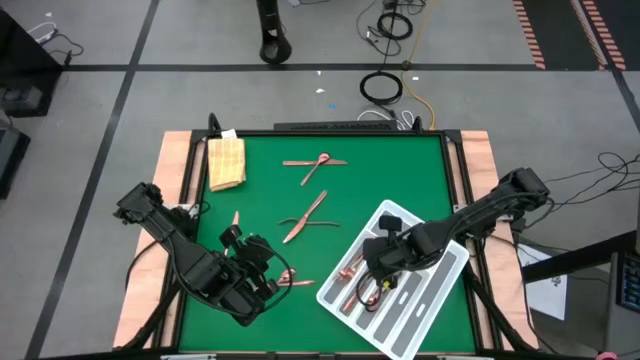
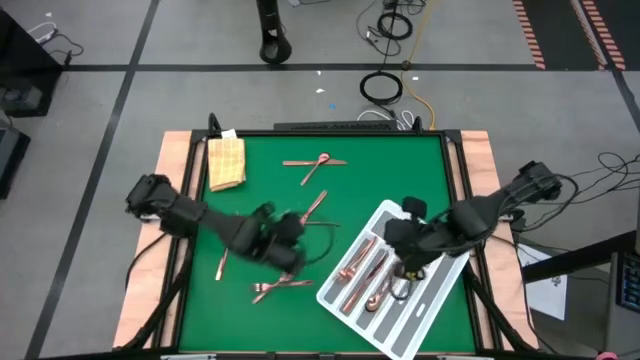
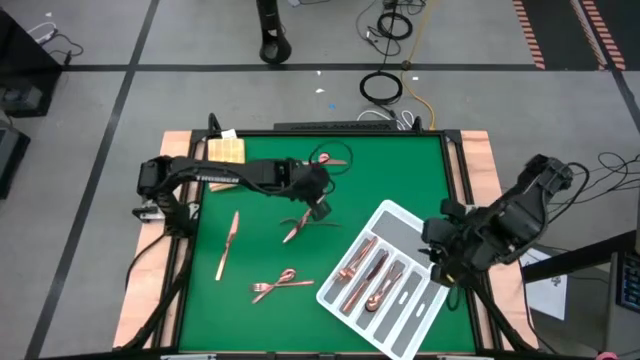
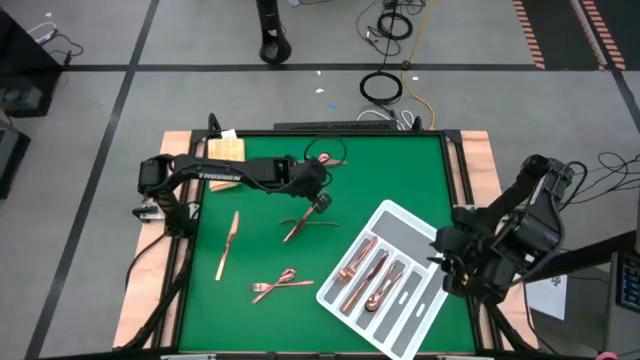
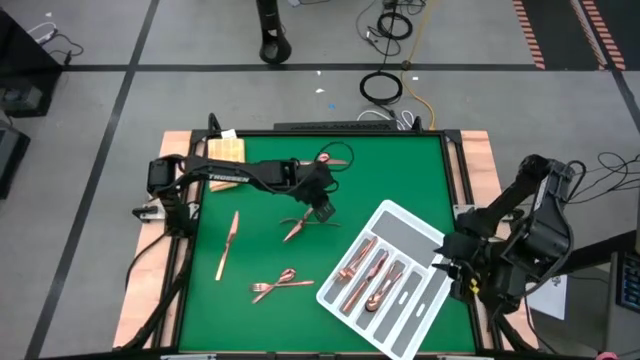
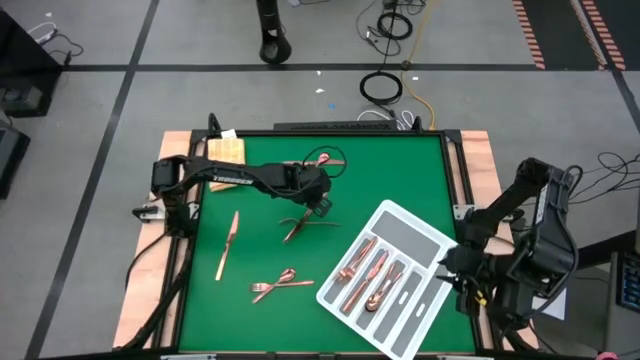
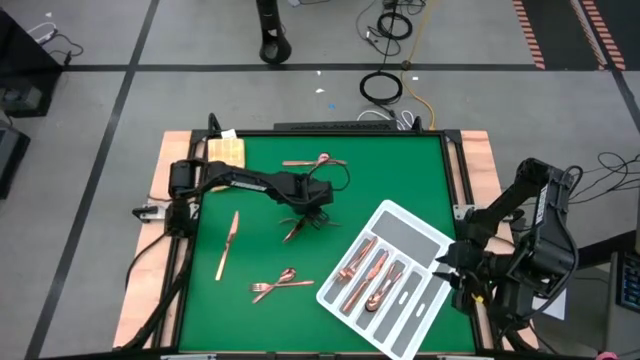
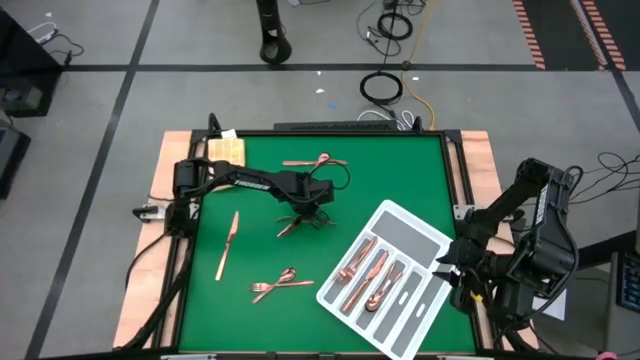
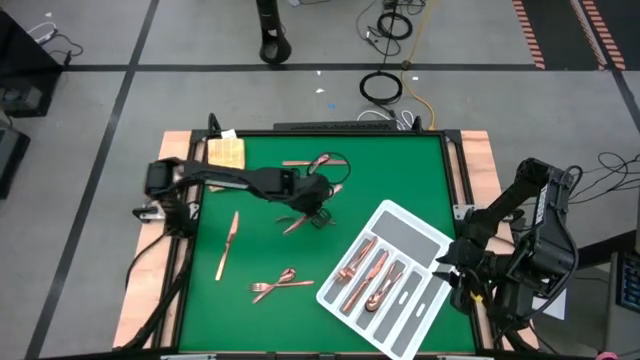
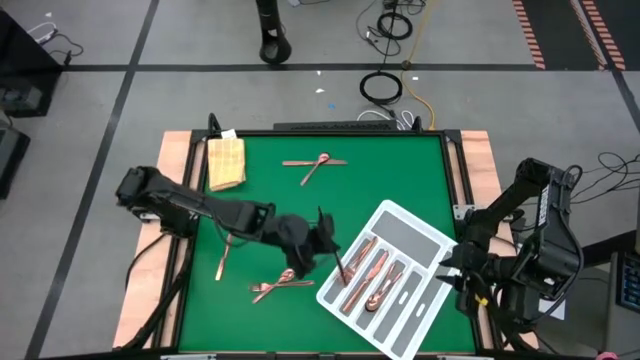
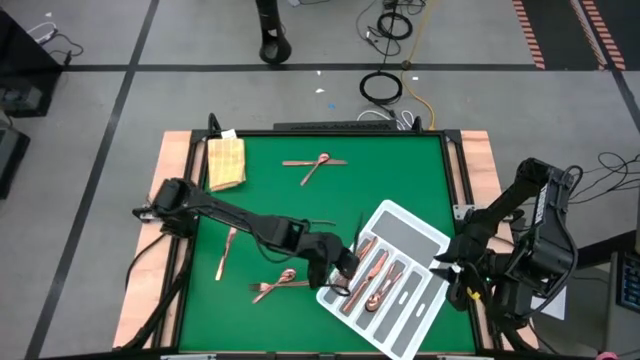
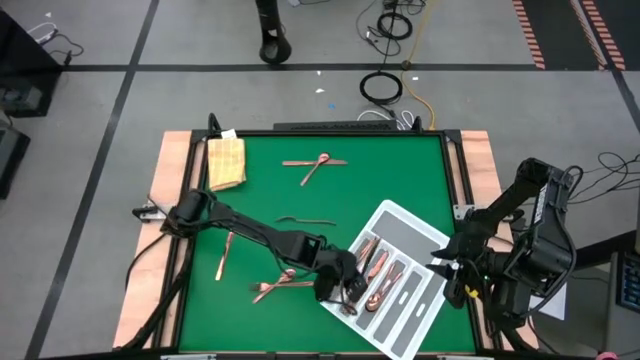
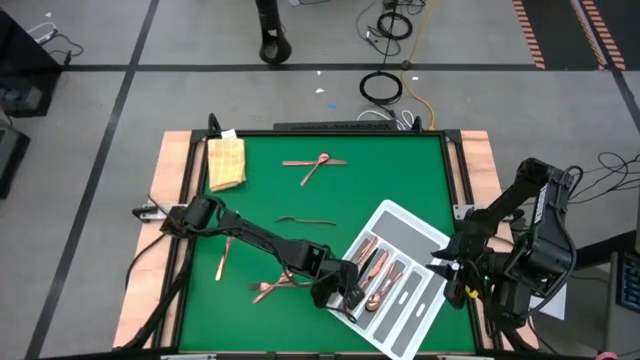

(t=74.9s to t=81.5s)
Task: Sort silverware
Put the bronze knife into the silverware tray

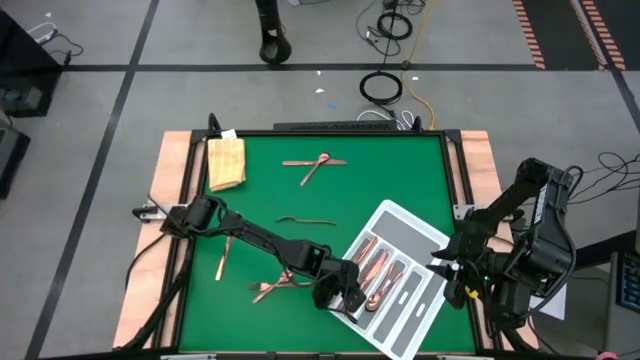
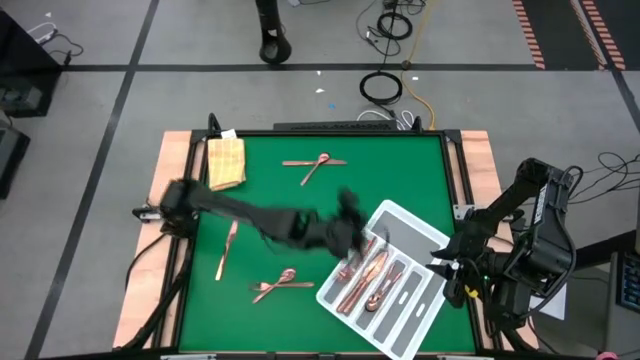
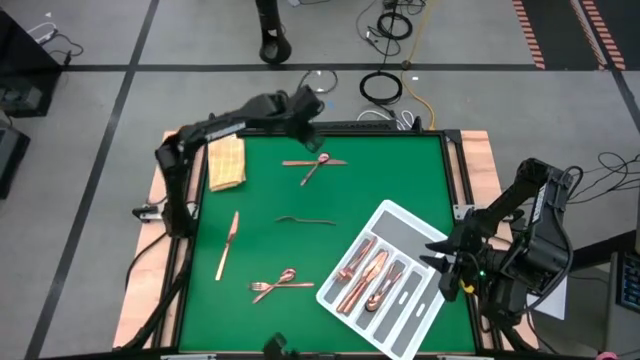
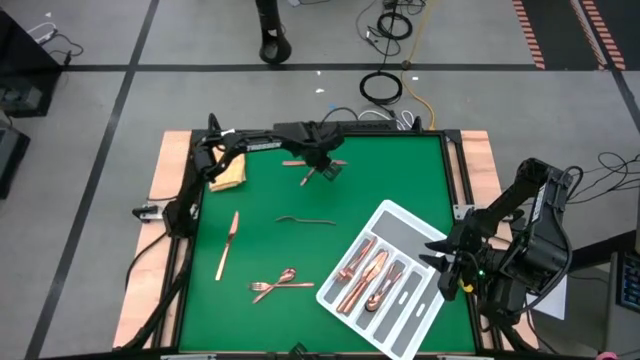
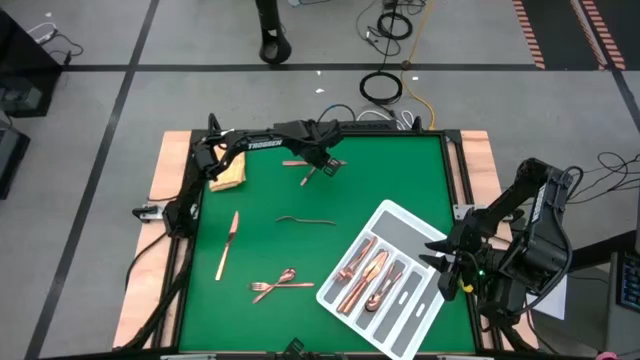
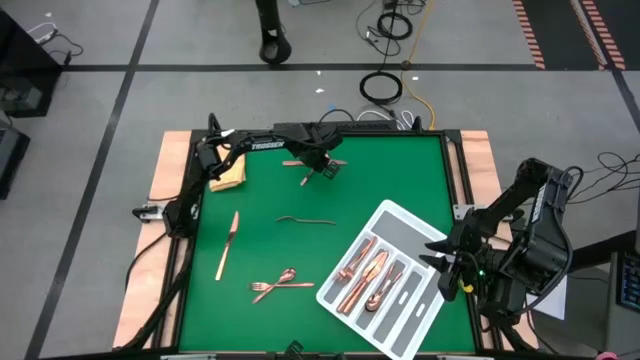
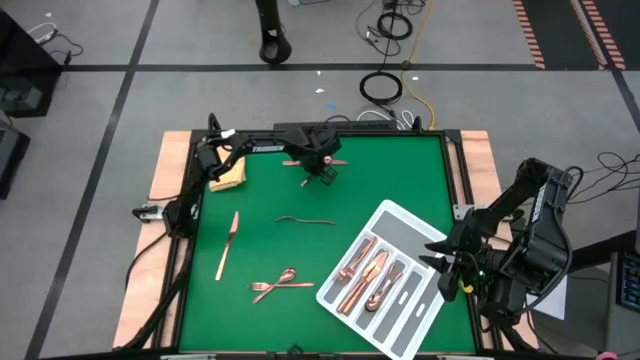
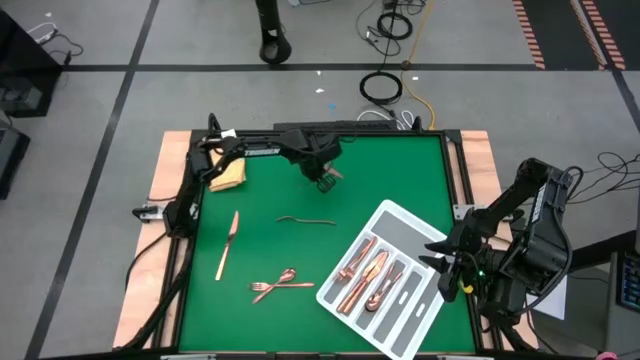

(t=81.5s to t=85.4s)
Put the bronze spoon into the silverware tray

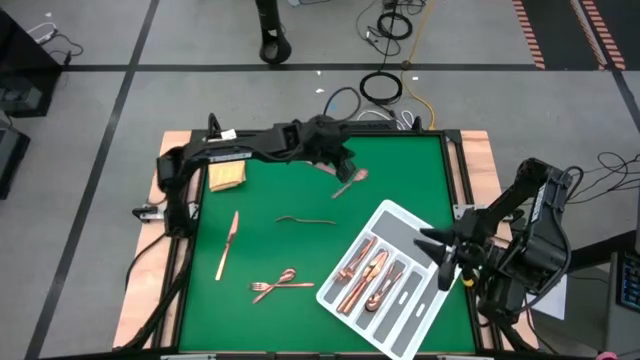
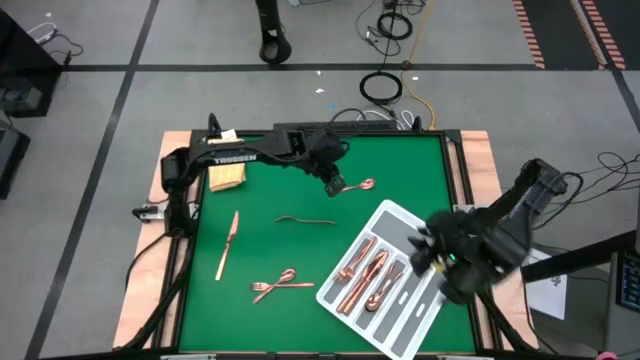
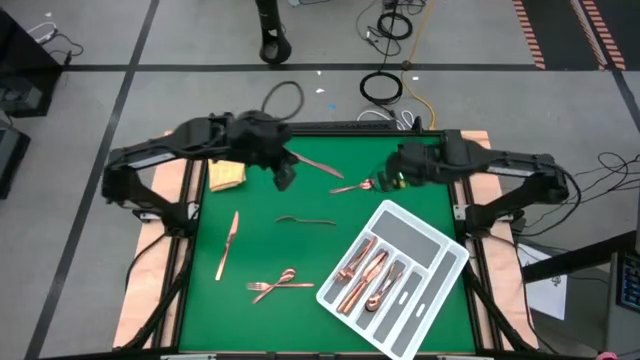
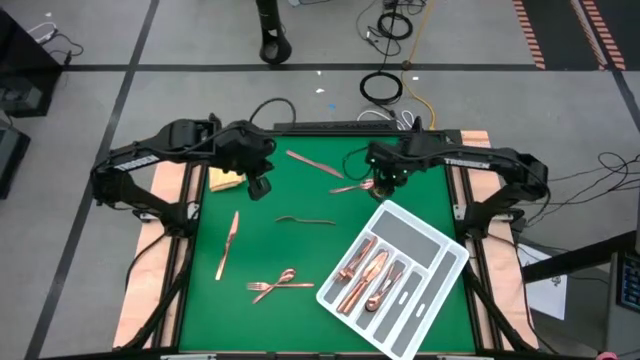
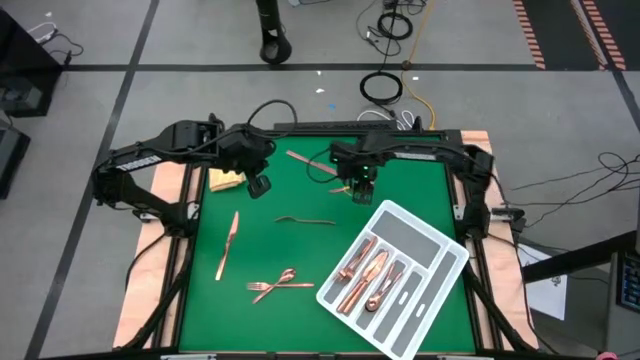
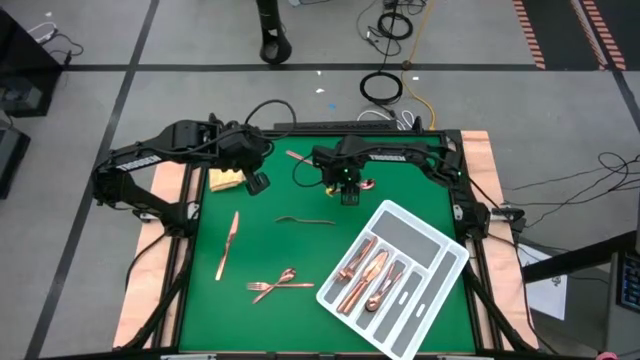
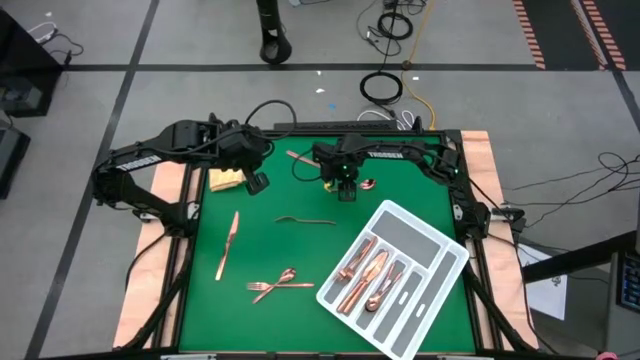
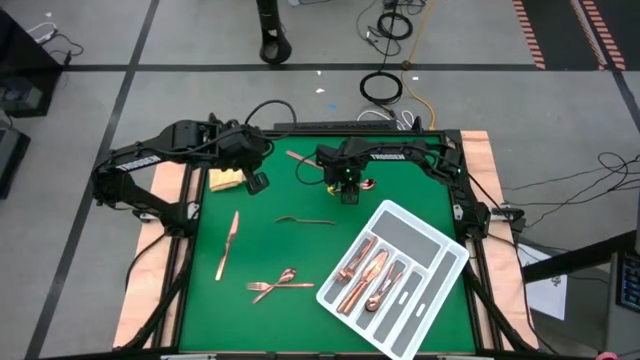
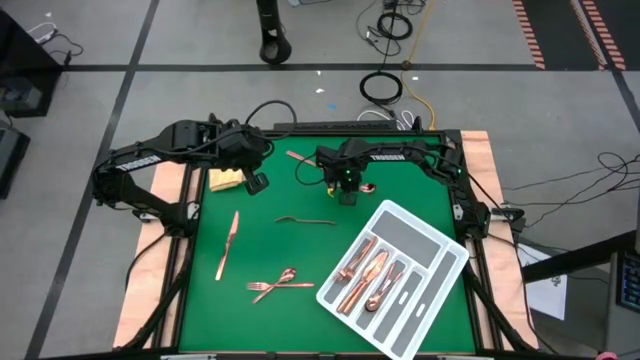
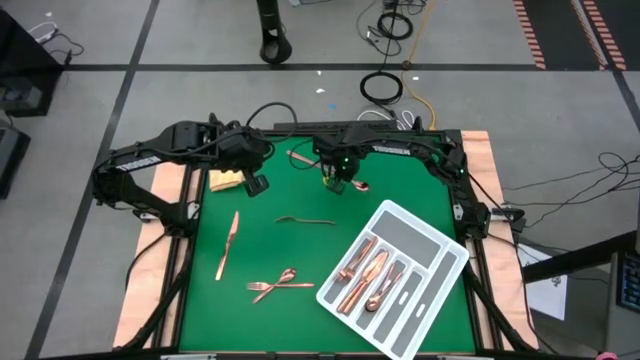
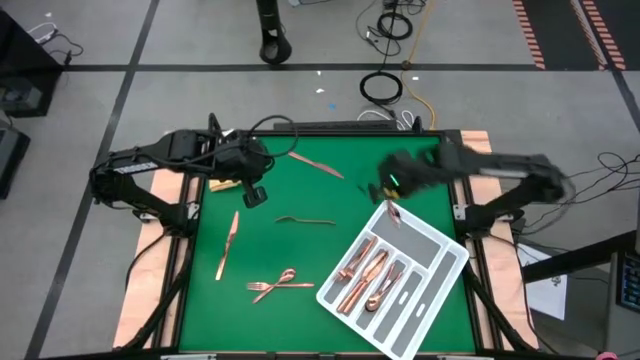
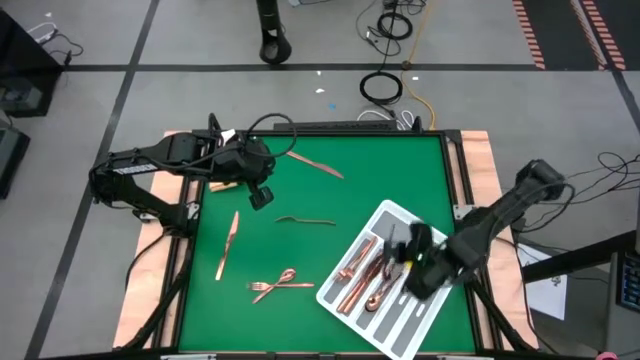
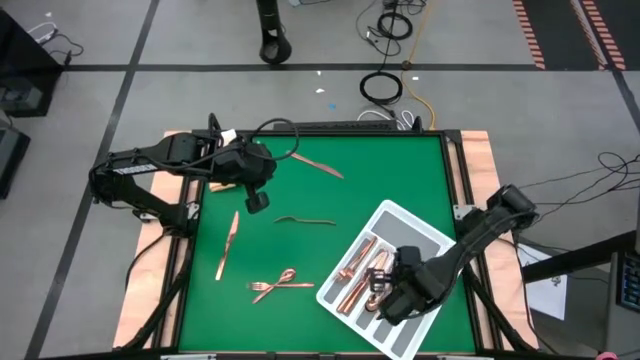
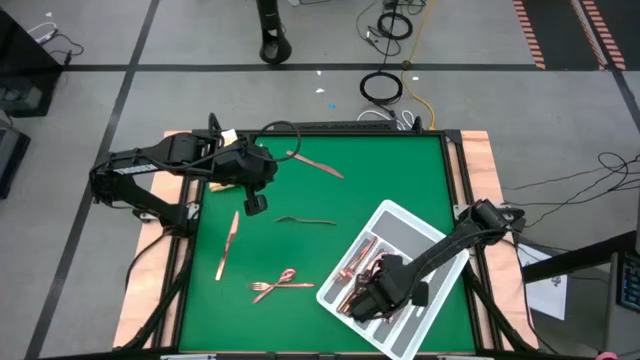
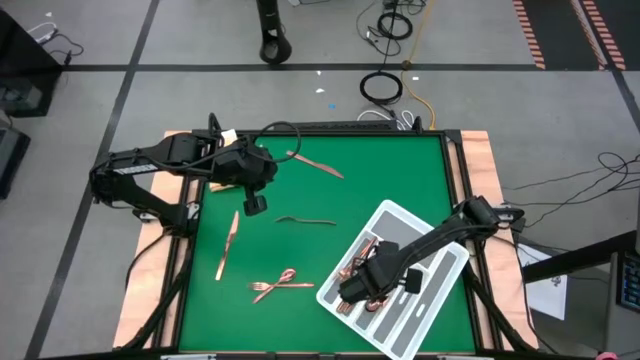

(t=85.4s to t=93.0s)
Put the bronze spoon into the silverware tray

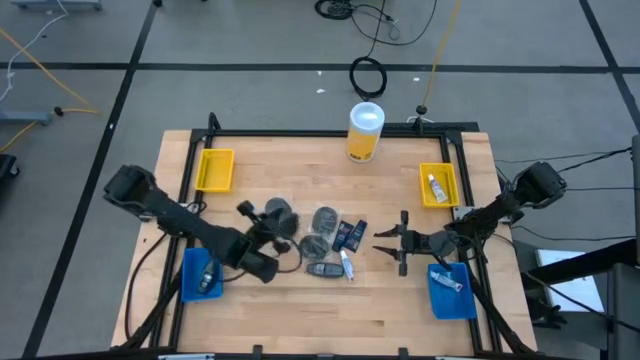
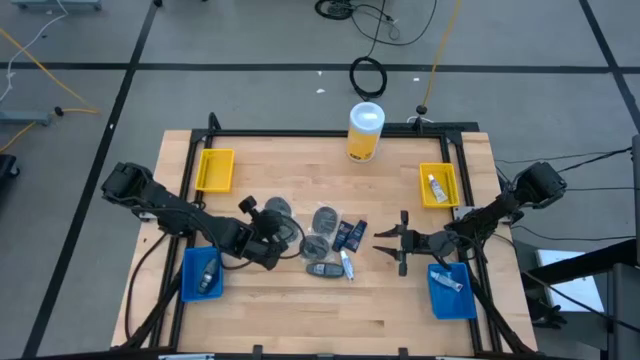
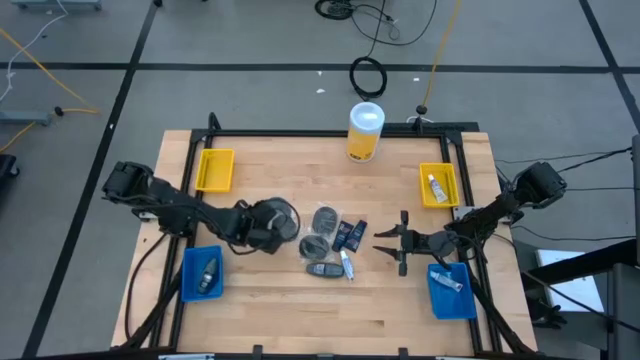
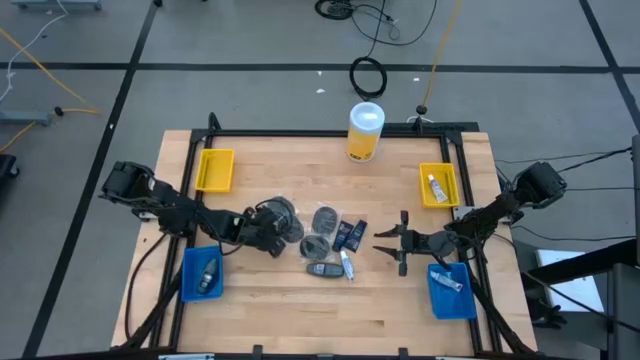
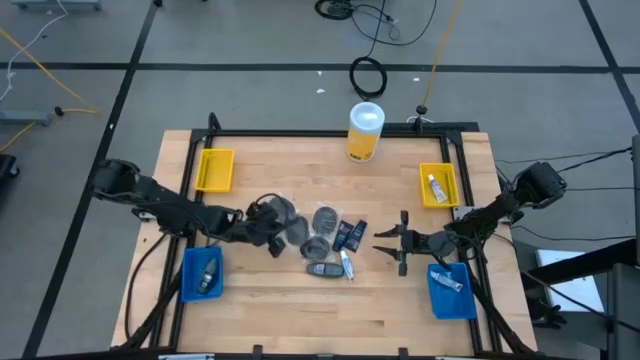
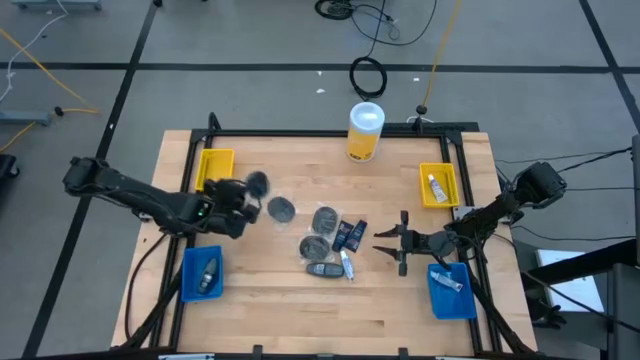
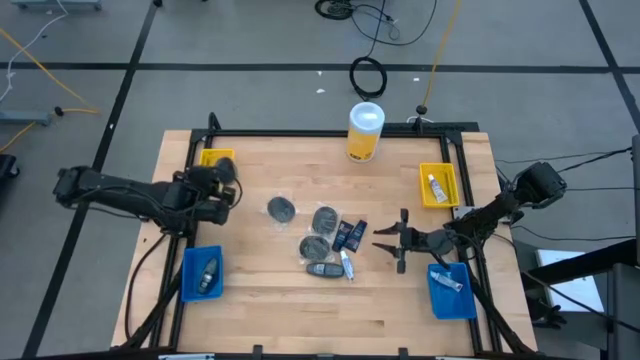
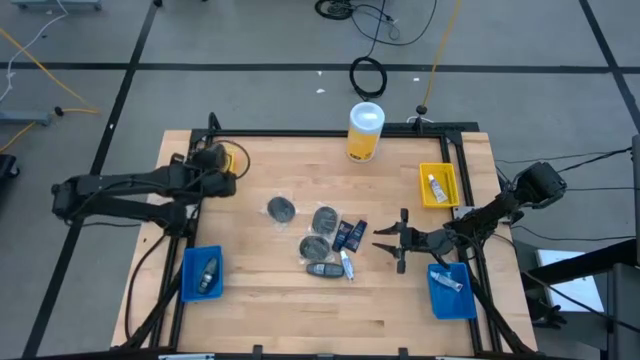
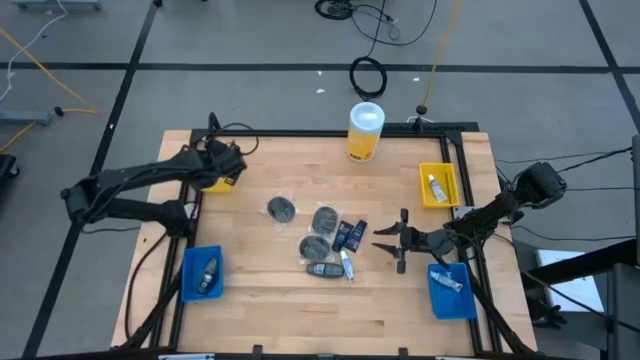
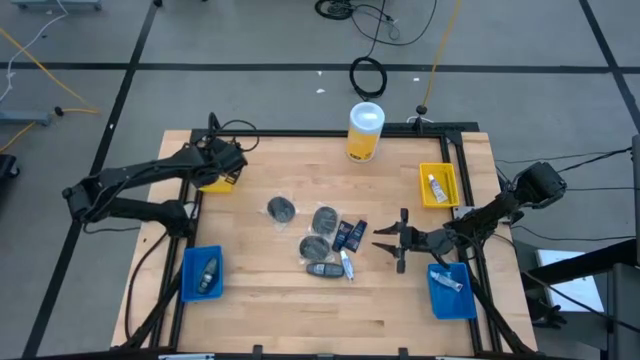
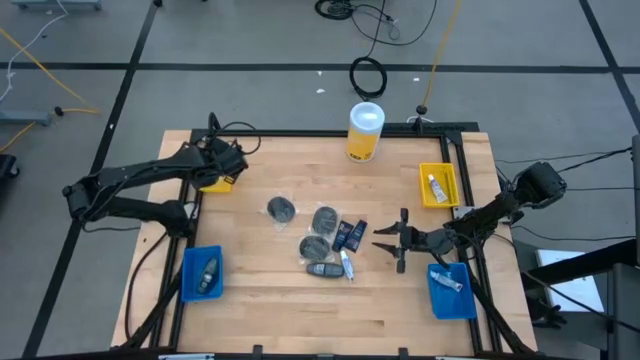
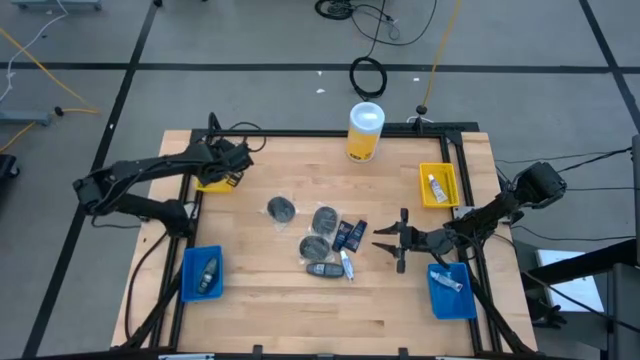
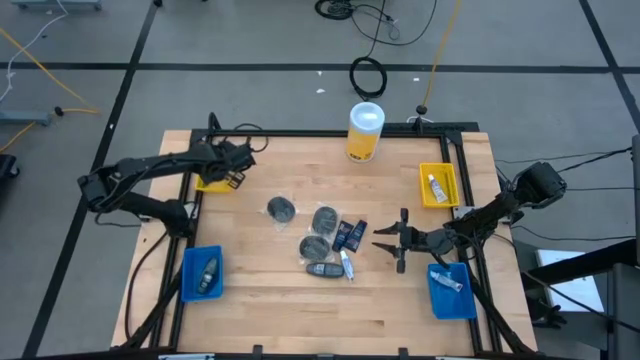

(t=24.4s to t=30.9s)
Task: Pick & Place Travel size toiletries
Put the black hairbrush into the left yellow bin
